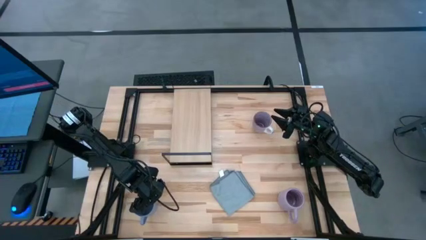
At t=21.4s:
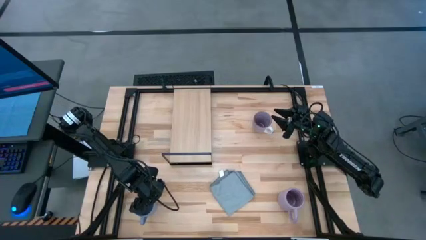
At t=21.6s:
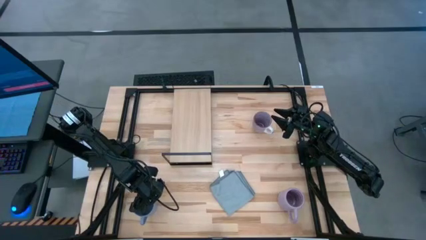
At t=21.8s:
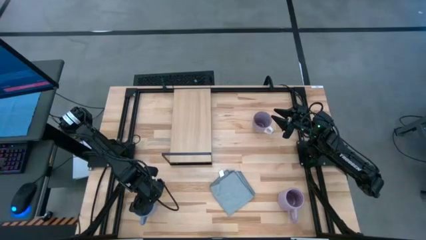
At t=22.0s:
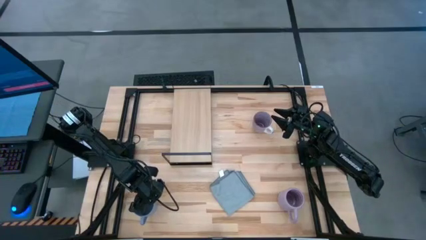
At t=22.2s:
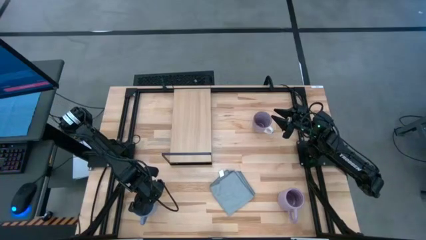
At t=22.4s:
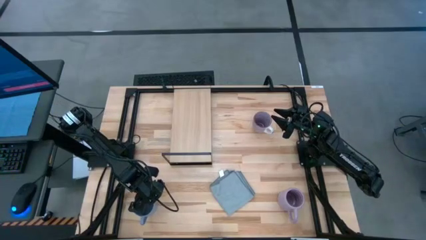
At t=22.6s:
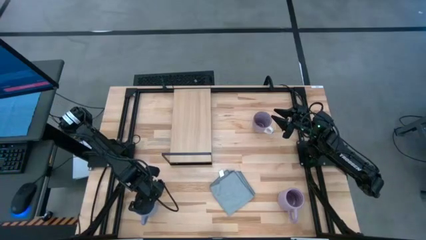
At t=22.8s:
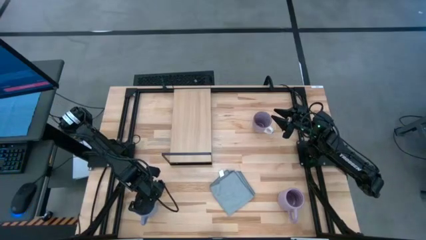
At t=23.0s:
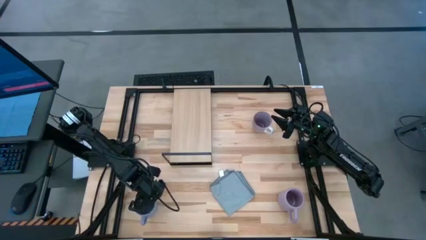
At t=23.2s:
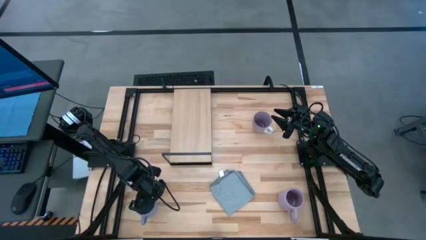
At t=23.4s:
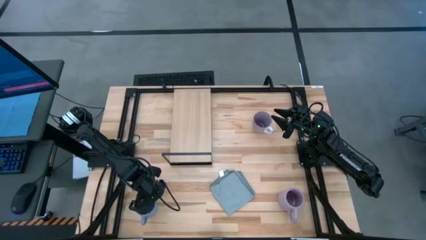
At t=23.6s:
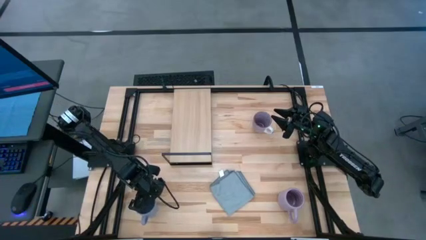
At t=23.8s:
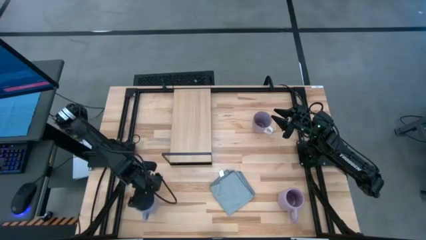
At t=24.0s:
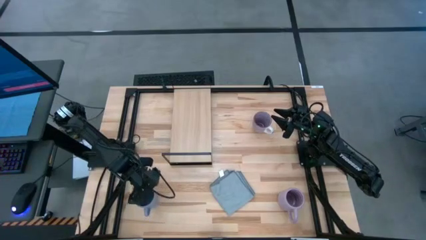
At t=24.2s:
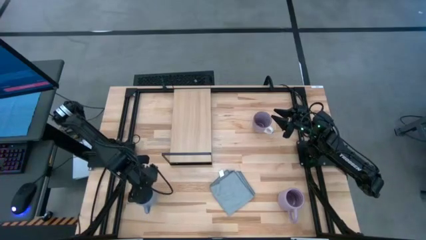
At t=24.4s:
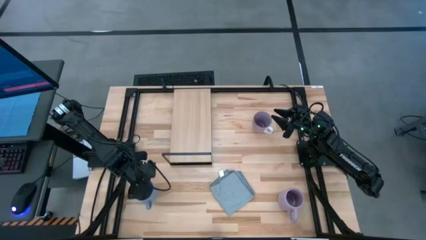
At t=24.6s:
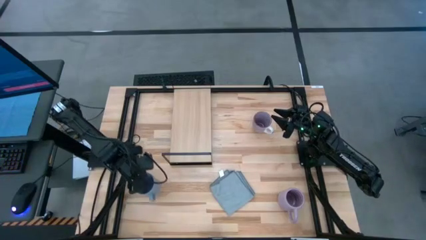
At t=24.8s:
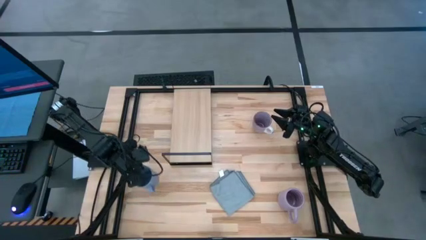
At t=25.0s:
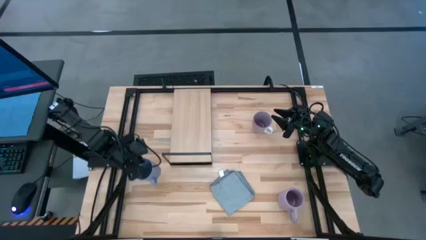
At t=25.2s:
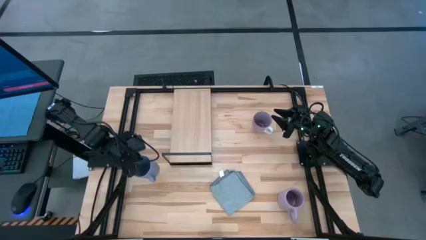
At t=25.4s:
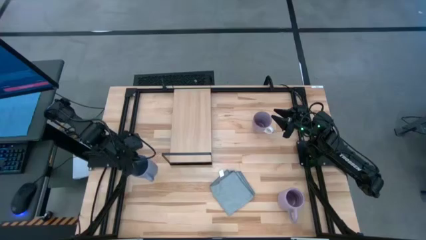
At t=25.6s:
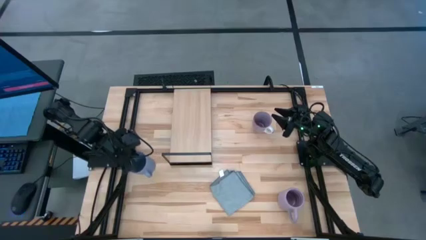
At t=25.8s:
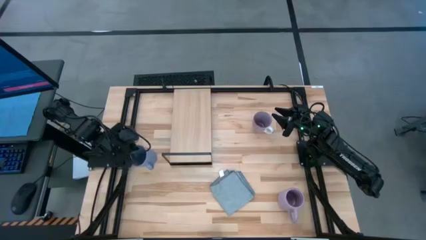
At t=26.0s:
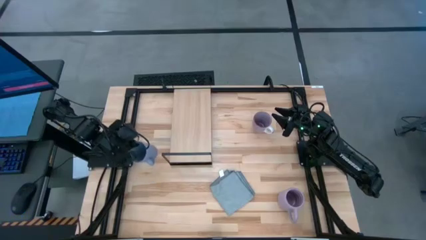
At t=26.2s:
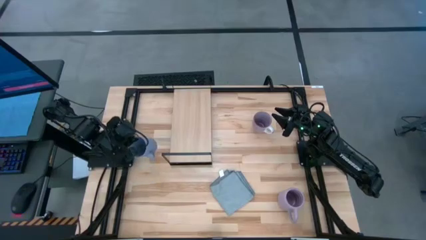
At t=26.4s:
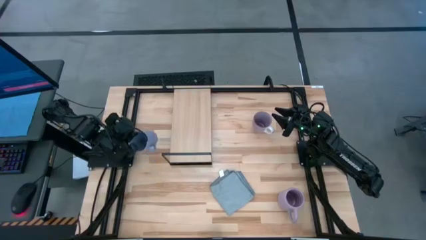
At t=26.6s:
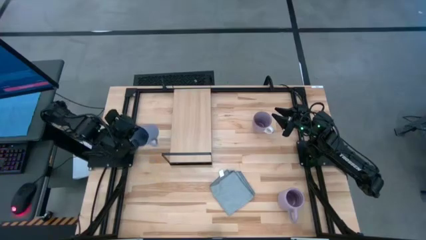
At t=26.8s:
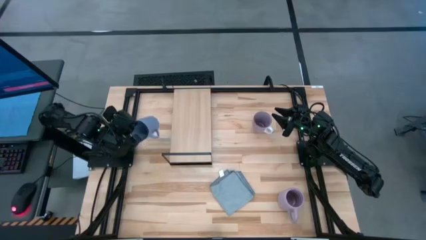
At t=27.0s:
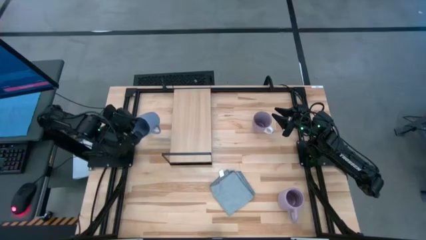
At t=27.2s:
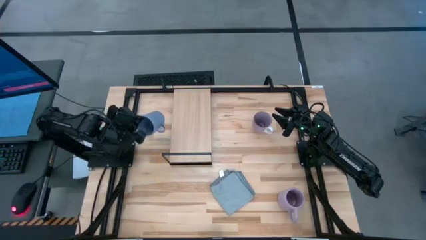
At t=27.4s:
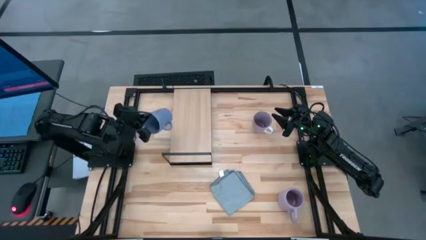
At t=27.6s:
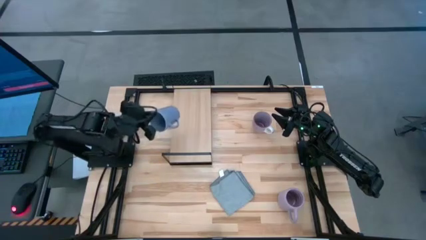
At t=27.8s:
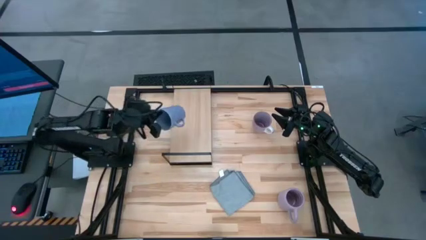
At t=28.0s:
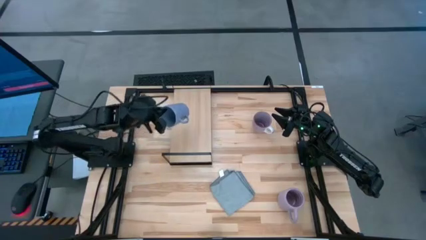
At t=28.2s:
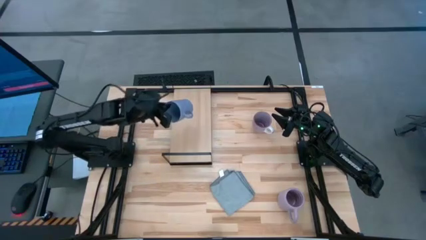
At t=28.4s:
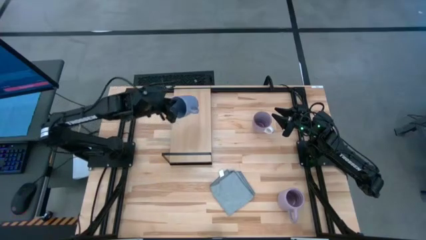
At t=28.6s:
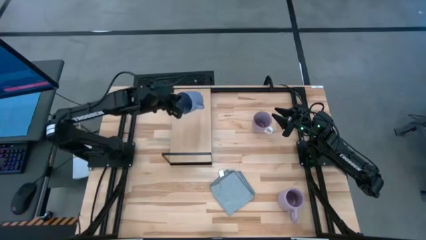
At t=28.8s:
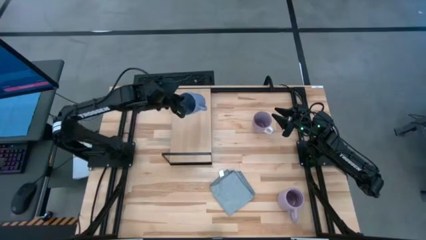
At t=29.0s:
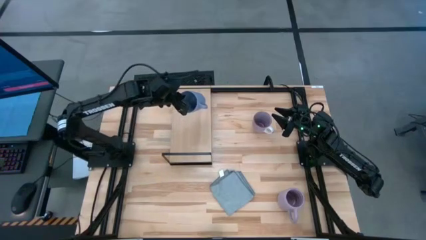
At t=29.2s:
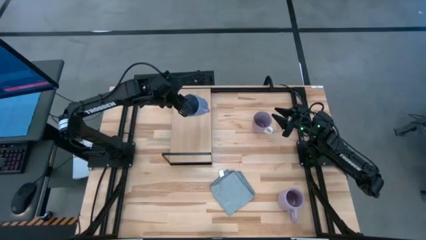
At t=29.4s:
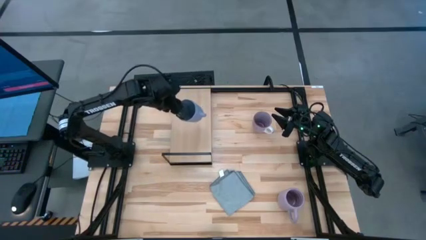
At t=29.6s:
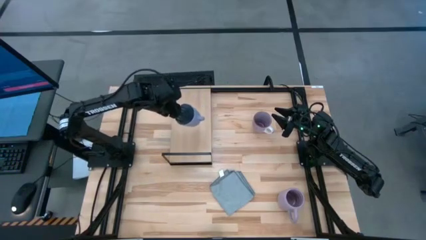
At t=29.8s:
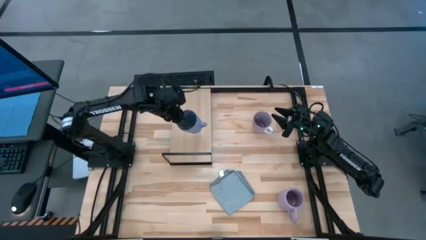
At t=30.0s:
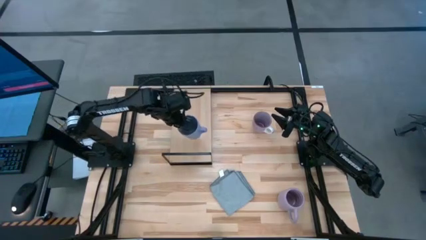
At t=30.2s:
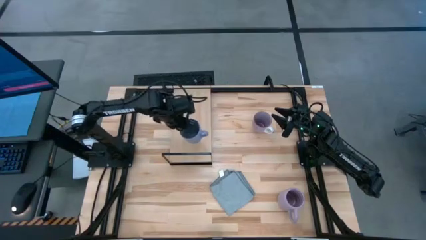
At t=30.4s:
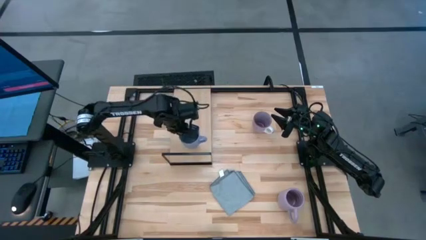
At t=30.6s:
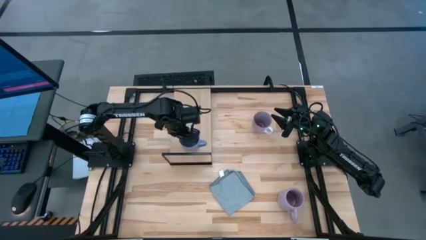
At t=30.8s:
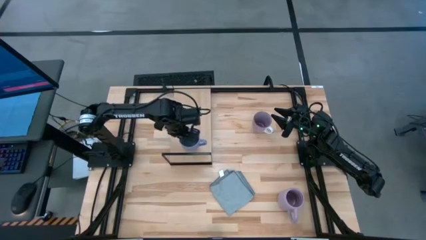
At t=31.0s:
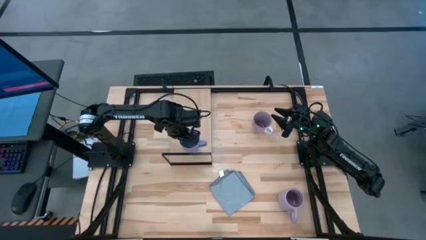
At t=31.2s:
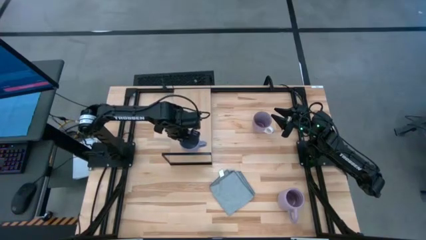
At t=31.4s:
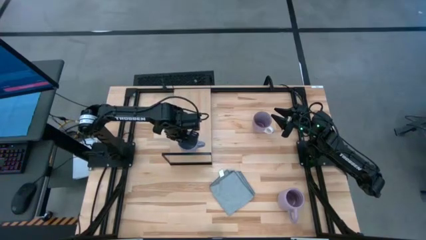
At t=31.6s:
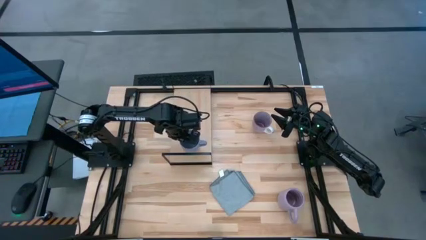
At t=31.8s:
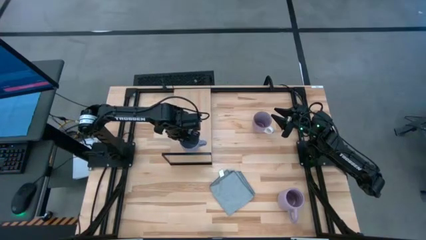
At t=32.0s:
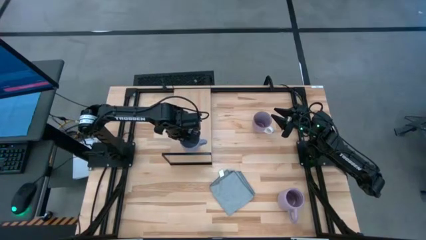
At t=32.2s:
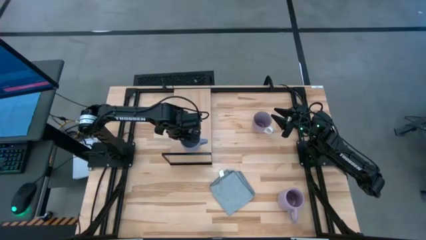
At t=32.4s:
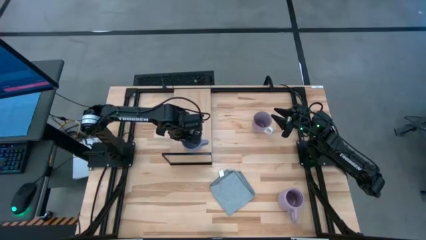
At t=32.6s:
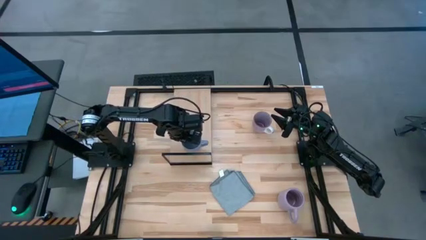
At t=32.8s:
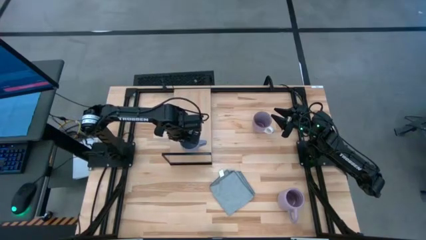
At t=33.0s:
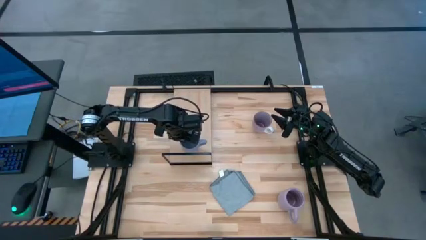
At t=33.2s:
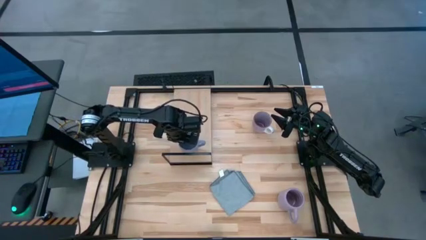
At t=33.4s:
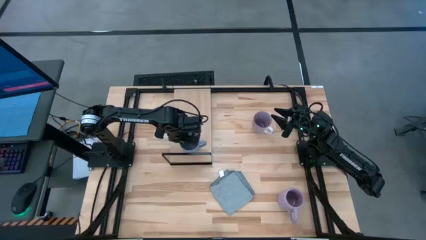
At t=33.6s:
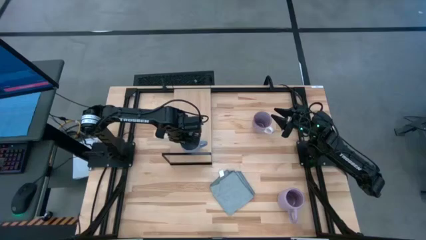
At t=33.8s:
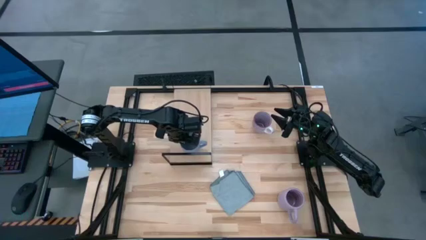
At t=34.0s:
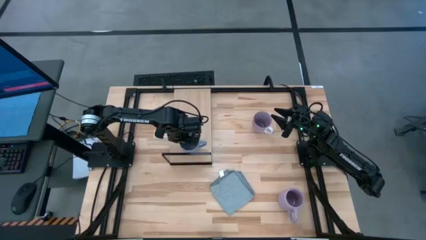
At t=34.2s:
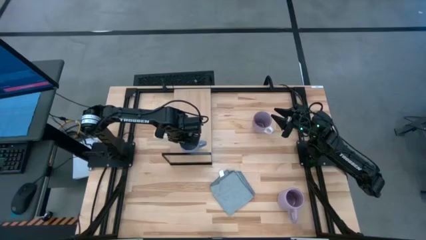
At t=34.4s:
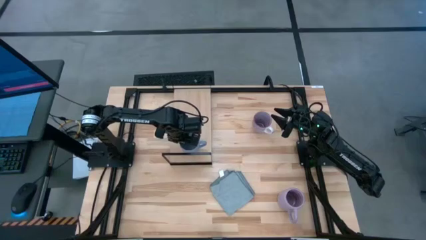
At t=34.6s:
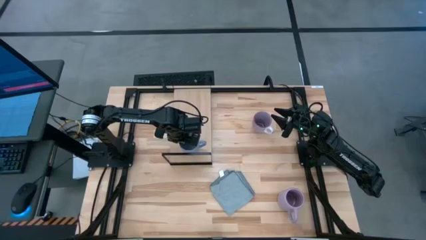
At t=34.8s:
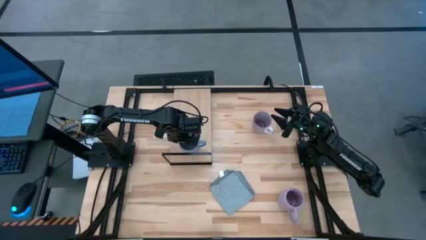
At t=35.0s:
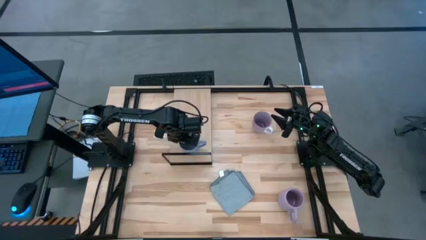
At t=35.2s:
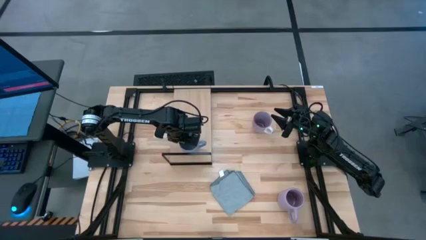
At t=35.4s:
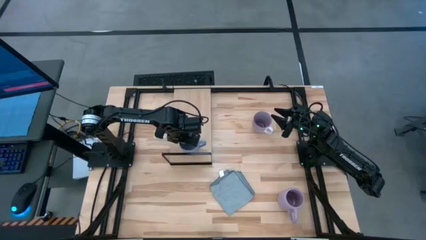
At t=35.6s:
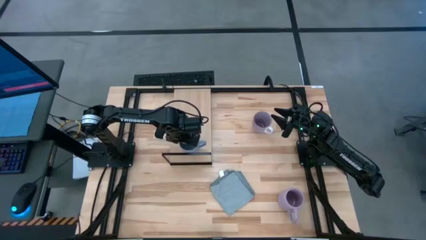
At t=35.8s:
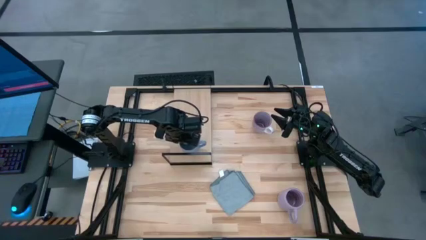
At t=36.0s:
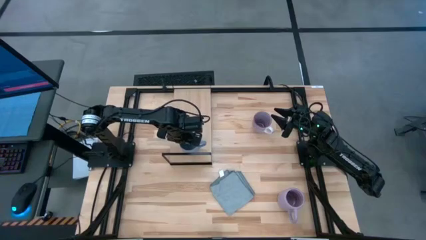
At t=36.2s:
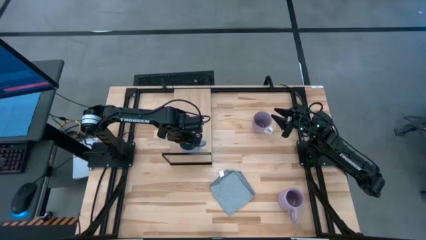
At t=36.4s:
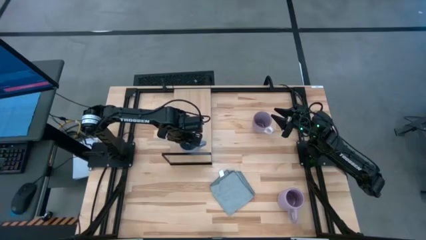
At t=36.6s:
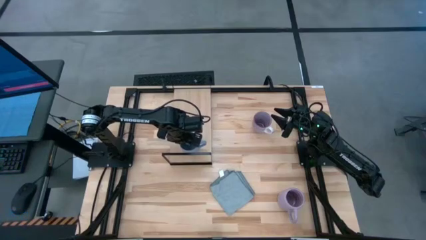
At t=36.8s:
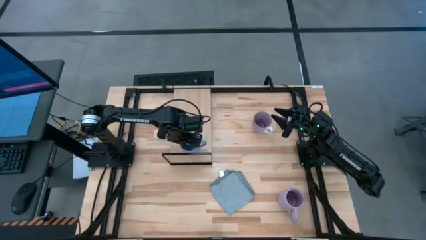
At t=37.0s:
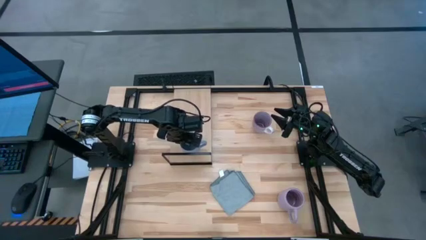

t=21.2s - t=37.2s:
Task: Stack small to large cups/mugs on shelf
Put the blue cup on the shelf
